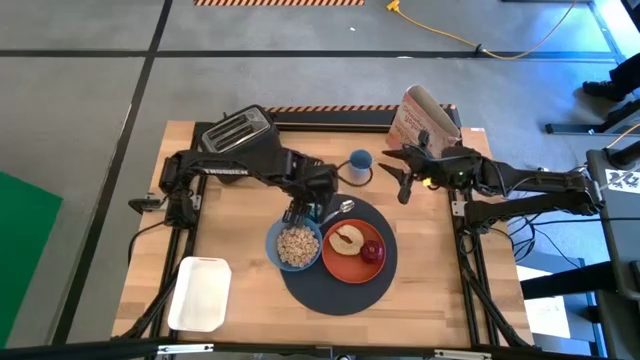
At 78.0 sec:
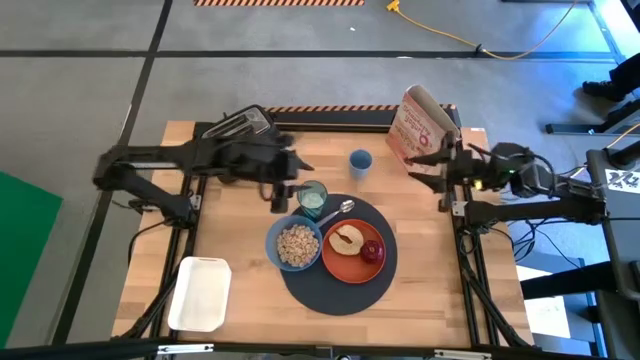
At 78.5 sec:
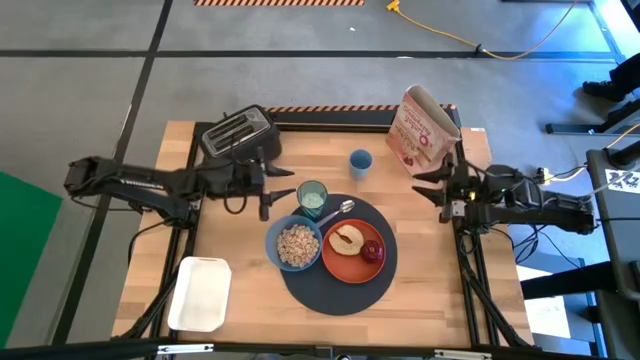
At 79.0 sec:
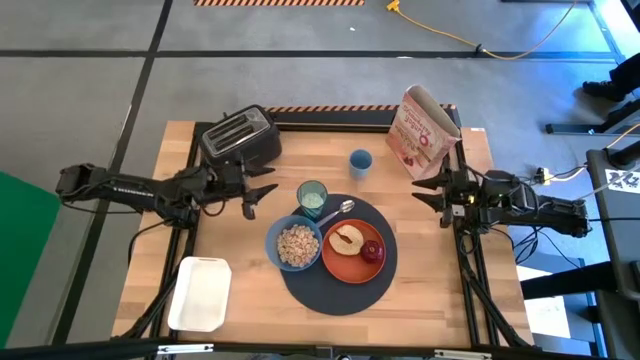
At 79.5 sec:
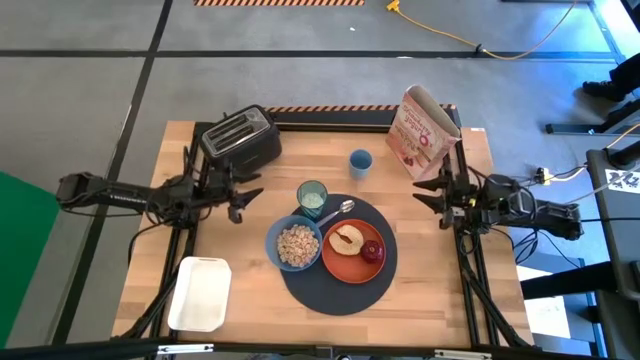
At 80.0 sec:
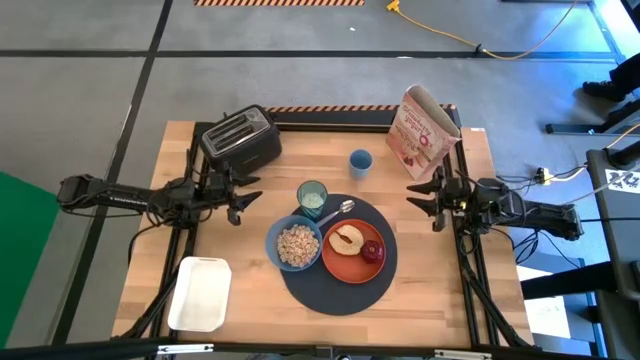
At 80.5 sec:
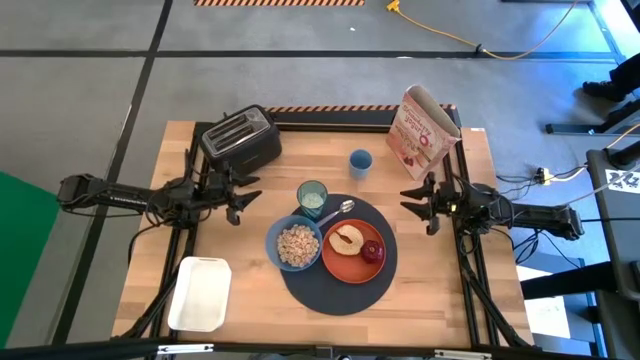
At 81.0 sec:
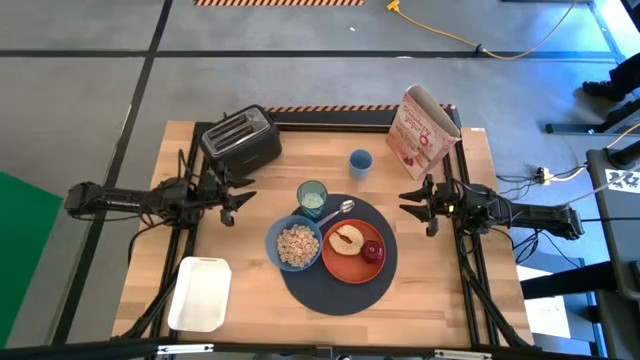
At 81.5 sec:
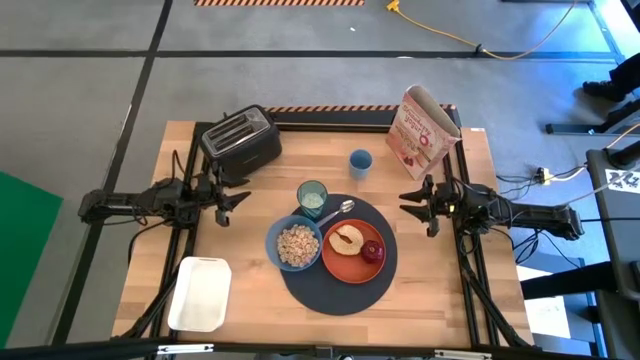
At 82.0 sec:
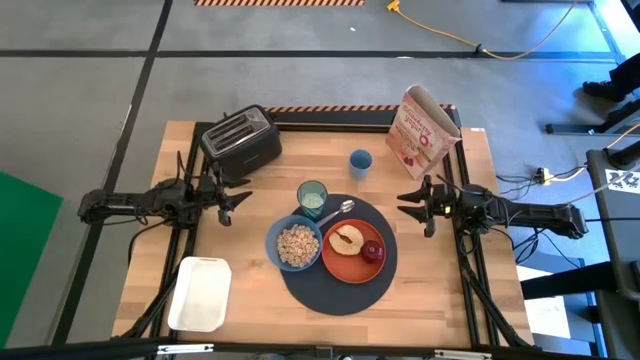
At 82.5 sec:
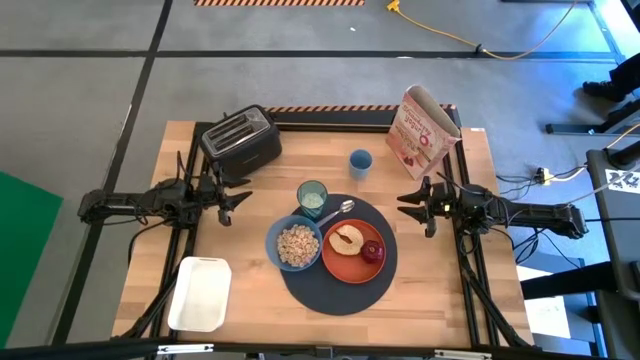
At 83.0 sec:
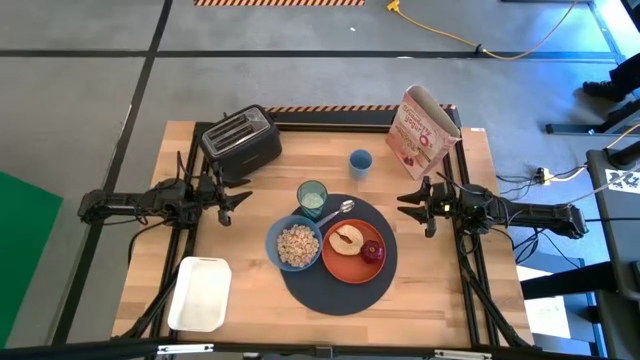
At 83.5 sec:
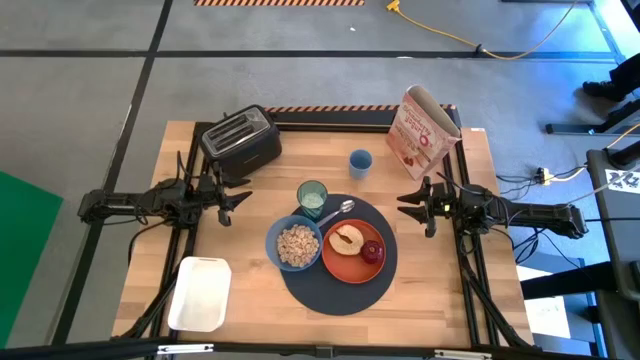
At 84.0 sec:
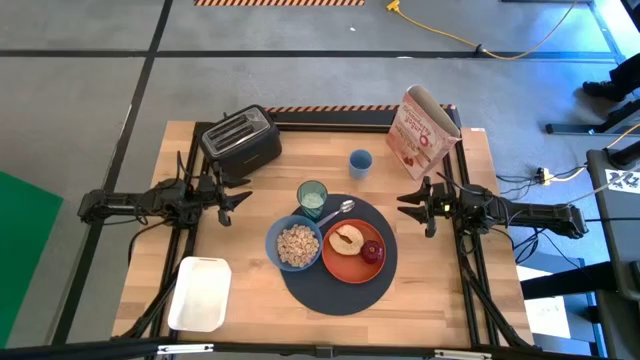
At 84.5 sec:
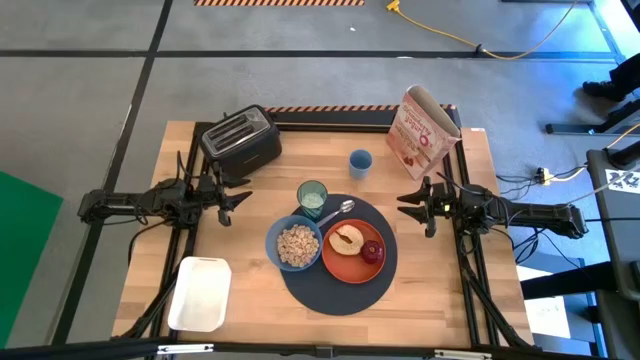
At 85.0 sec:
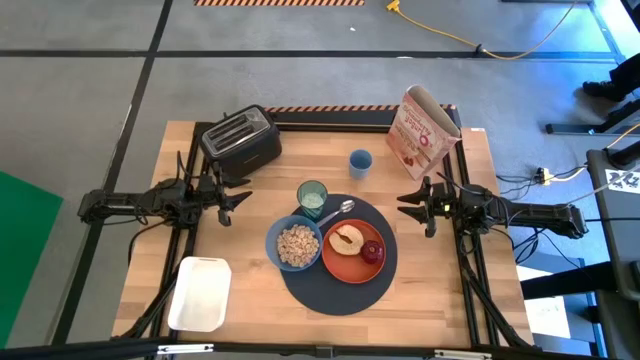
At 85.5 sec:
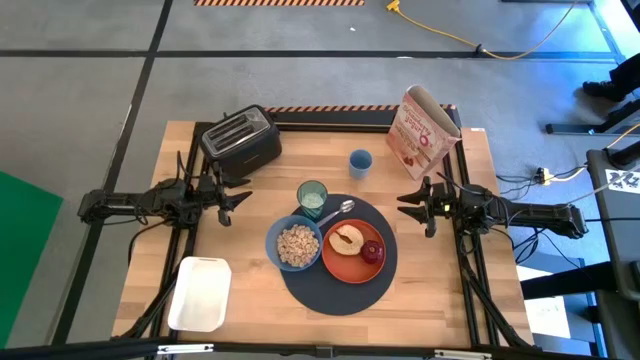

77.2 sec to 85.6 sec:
Task: Arrange a breakfast setting
Return to Home Position

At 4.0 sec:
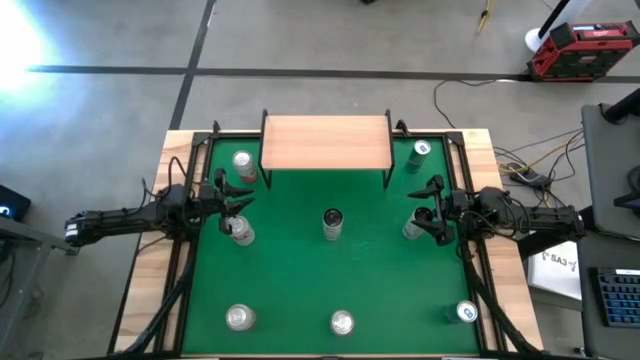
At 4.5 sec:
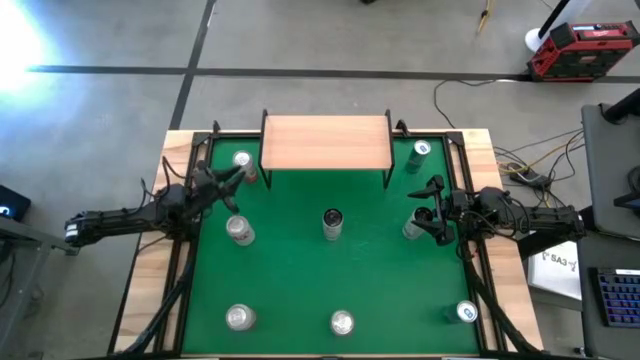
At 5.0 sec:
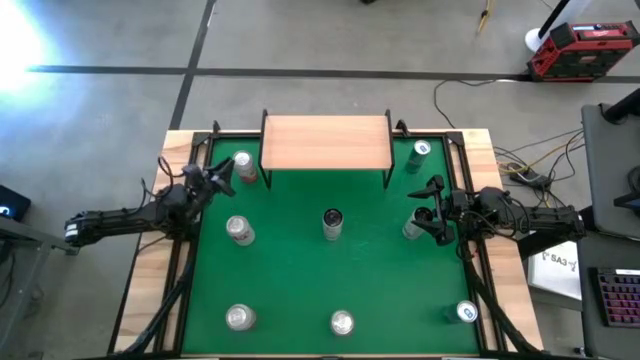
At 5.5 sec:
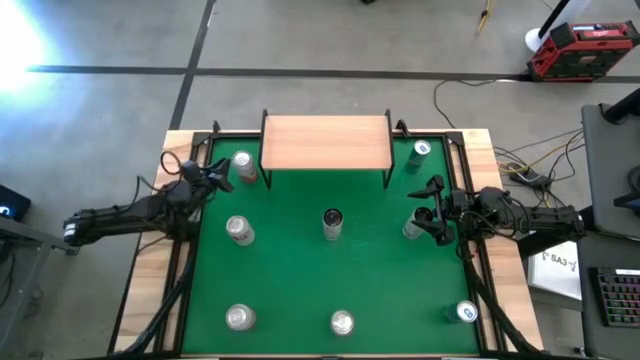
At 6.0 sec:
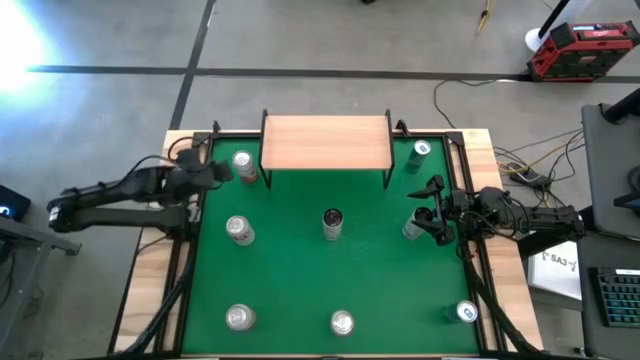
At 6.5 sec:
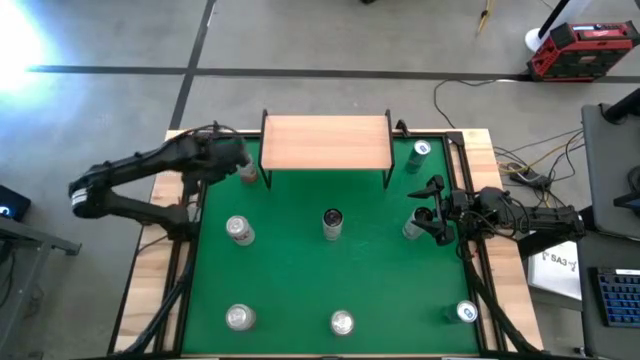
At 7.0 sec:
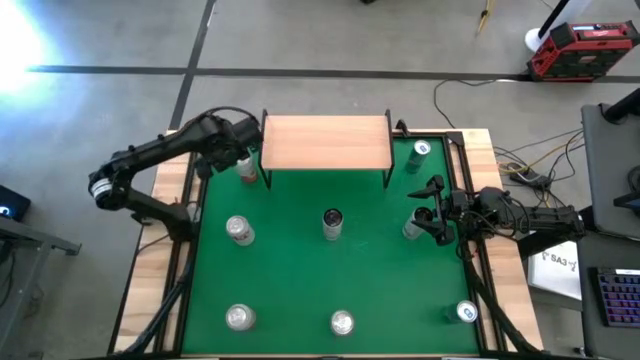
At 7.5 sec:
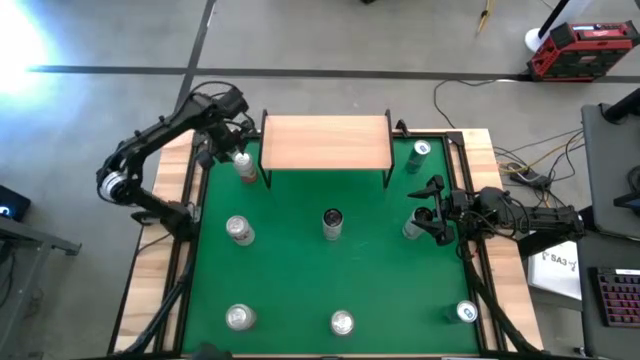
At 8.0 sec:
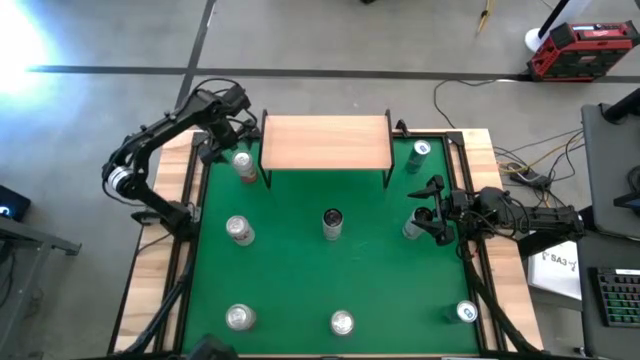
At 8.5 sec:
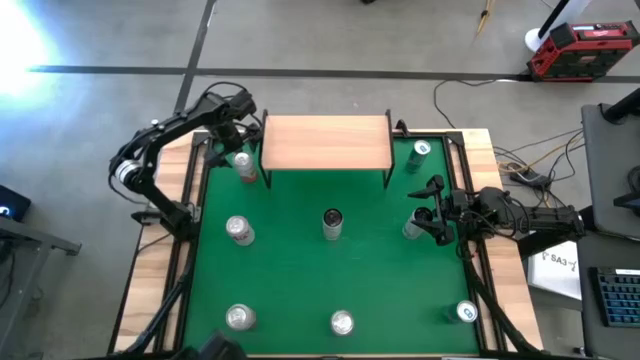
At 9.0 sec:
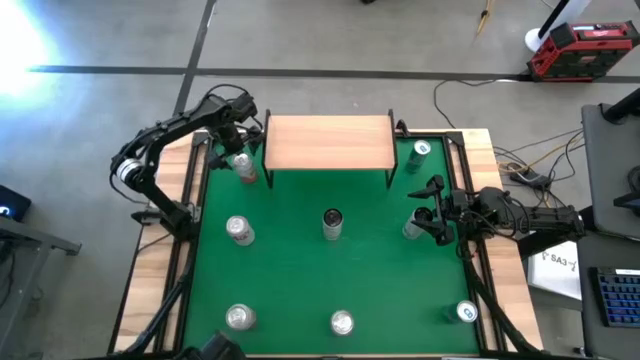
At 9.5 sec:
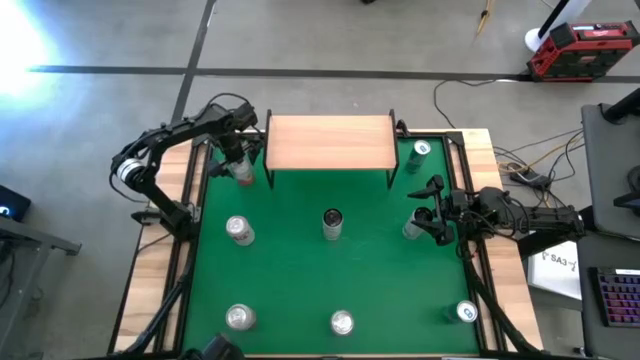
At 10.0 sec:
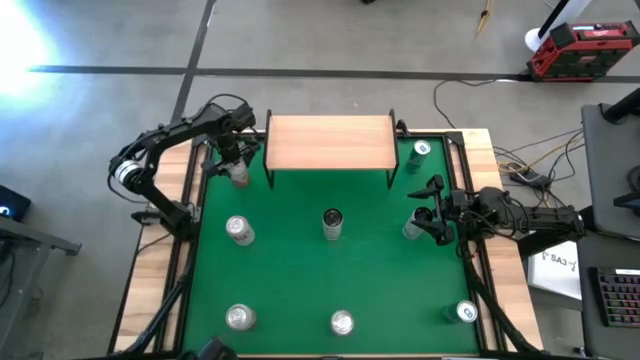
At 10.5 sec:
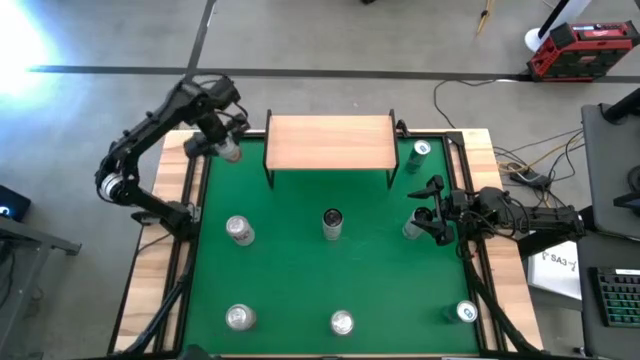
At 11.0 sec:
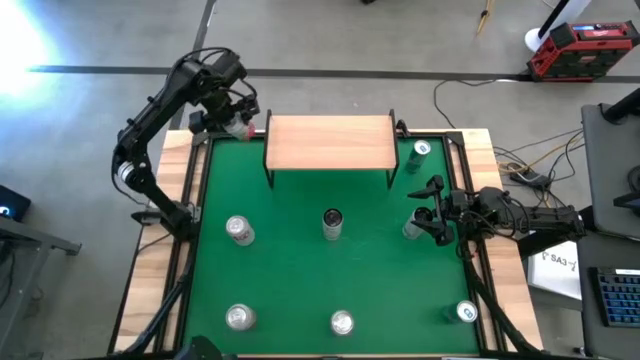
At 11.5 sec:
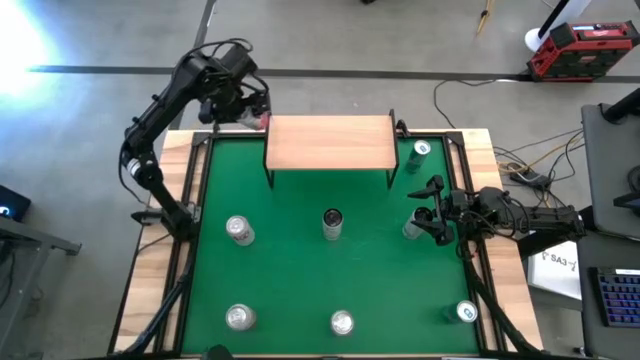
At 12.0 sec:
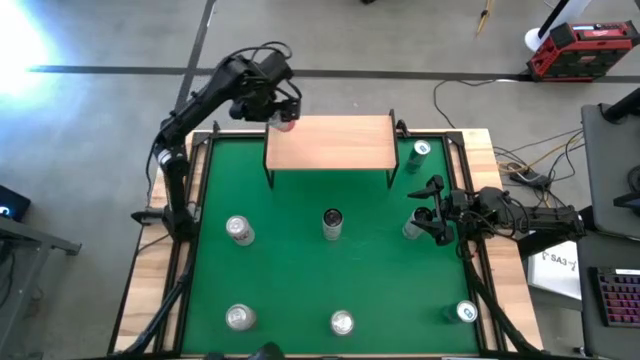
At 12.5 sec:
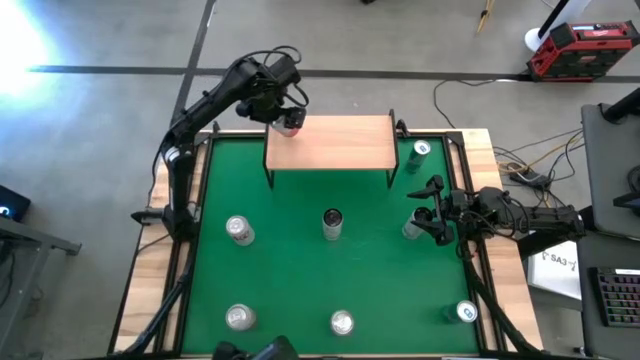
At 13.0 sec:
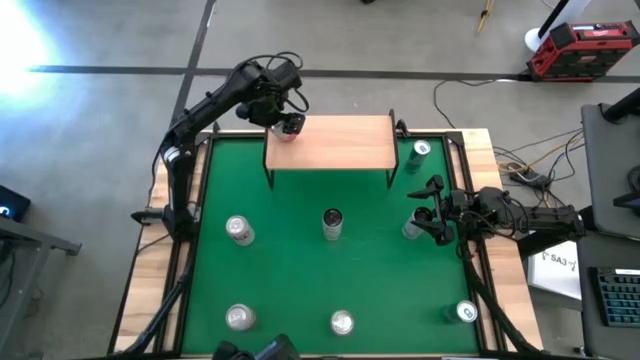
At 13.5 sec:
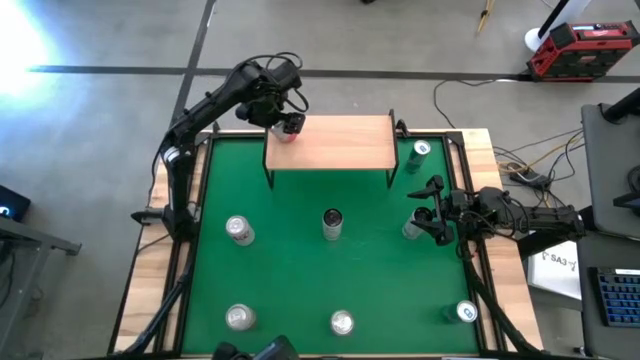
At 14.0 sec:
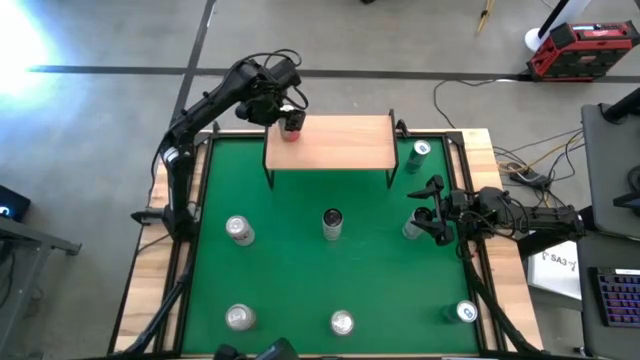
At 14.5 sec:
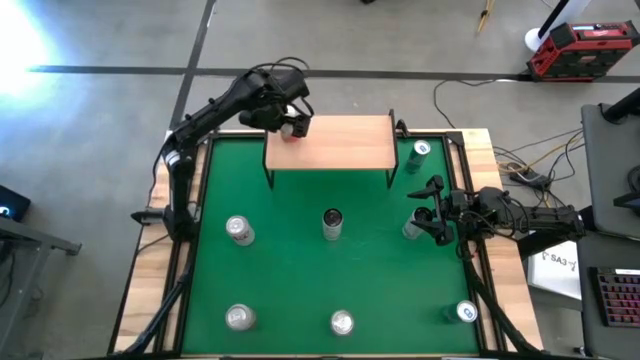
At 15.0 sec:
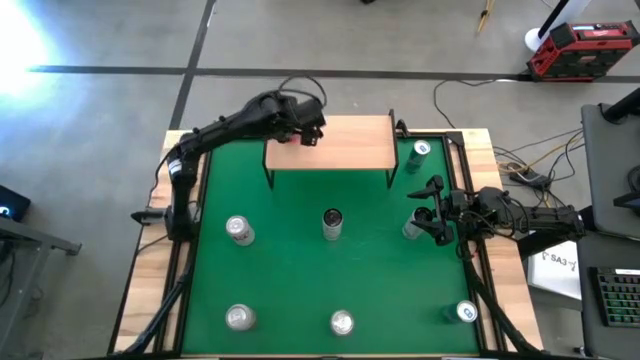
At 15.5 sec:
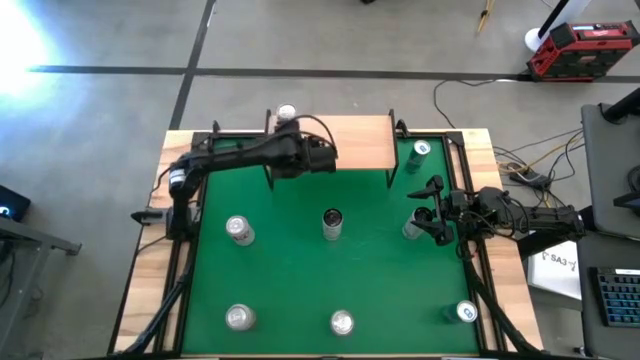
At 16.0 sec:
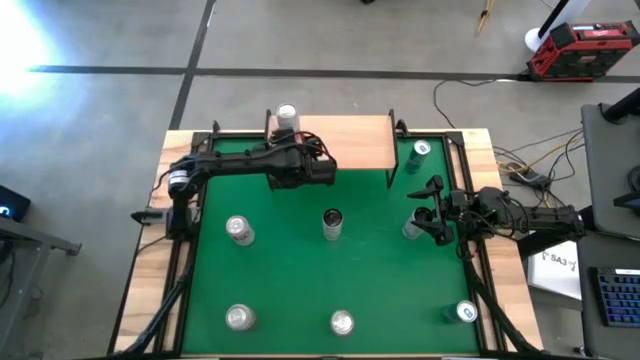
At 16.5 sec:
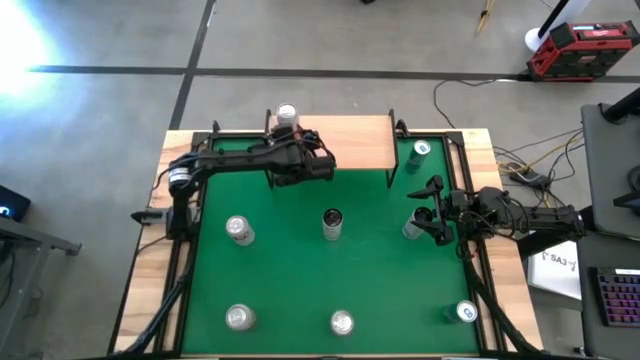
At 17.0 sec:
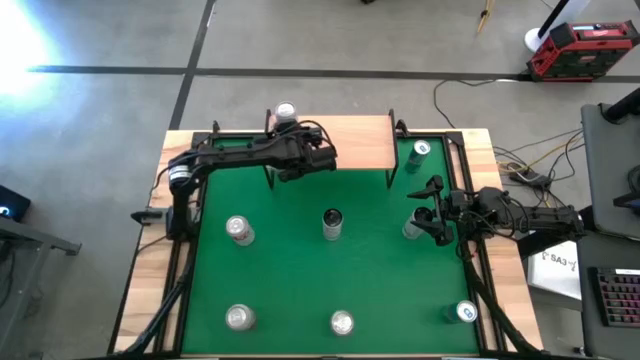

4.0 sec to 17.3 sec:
Task: Place canned beverage on shelf
Put the top pink-white soda can on the shelf
